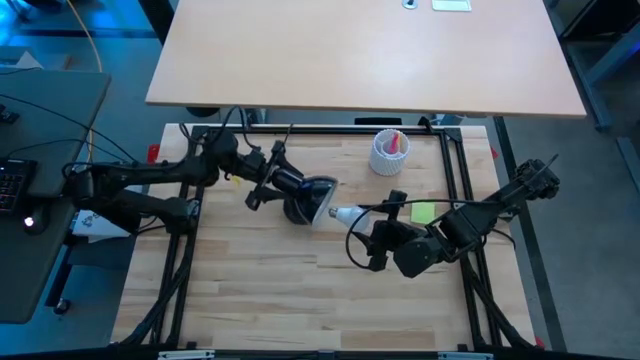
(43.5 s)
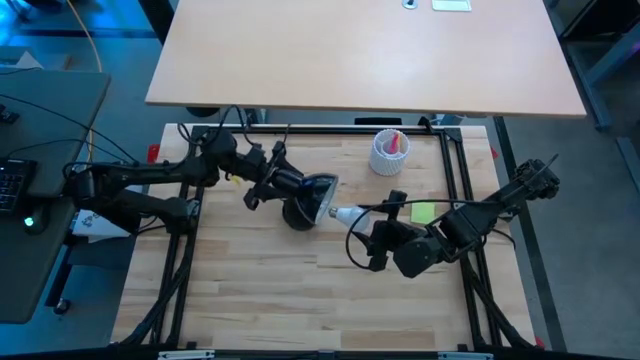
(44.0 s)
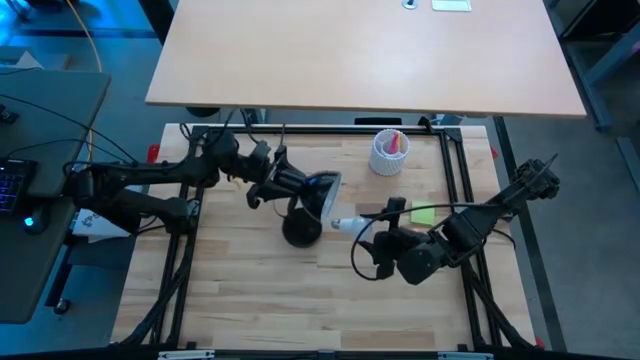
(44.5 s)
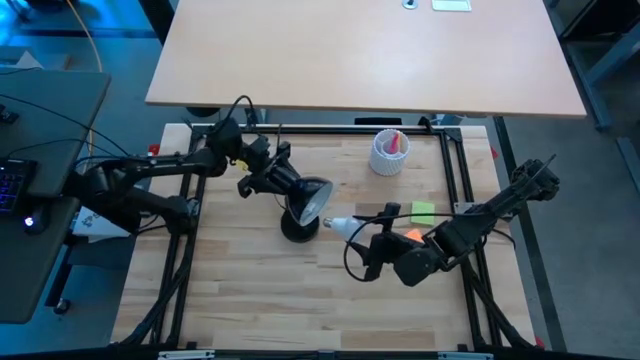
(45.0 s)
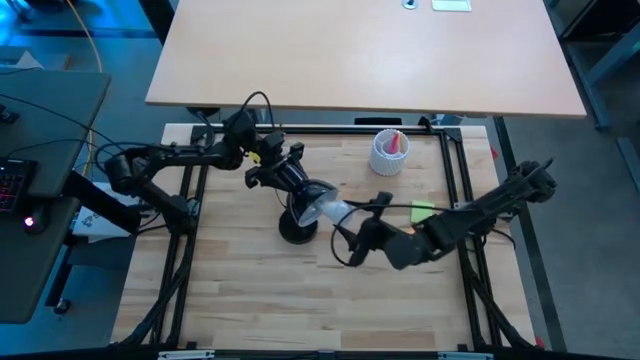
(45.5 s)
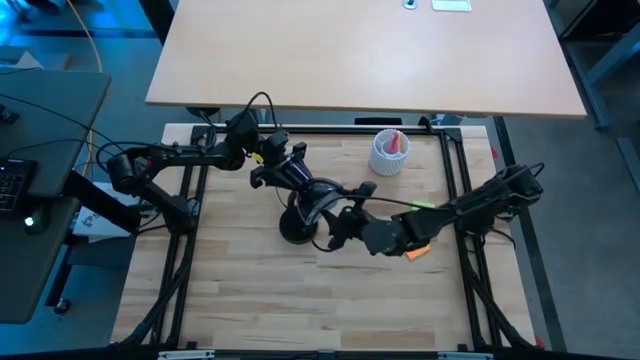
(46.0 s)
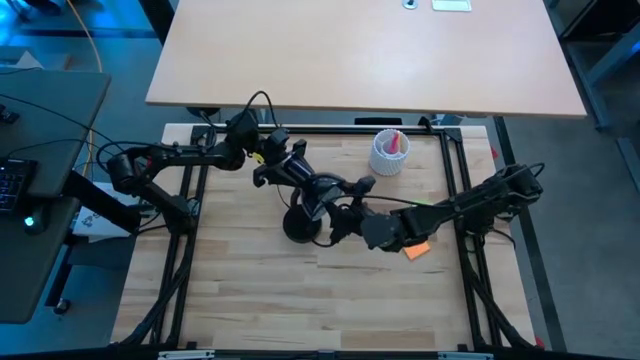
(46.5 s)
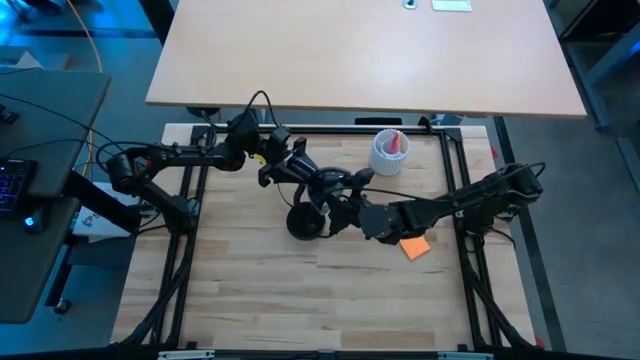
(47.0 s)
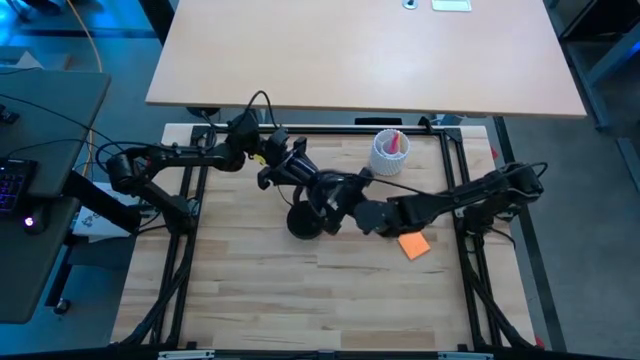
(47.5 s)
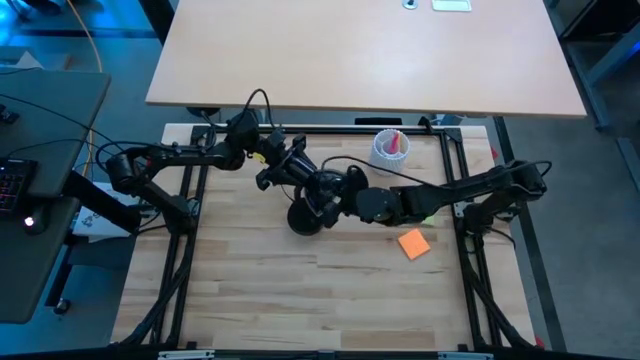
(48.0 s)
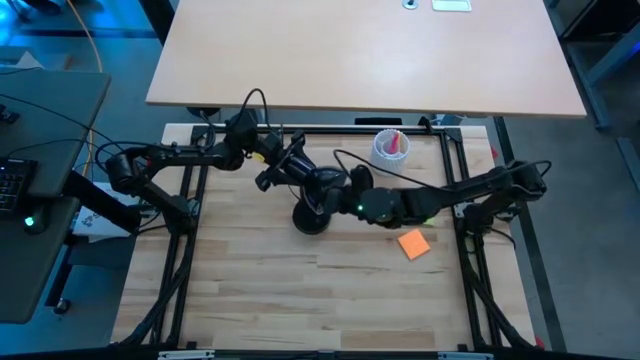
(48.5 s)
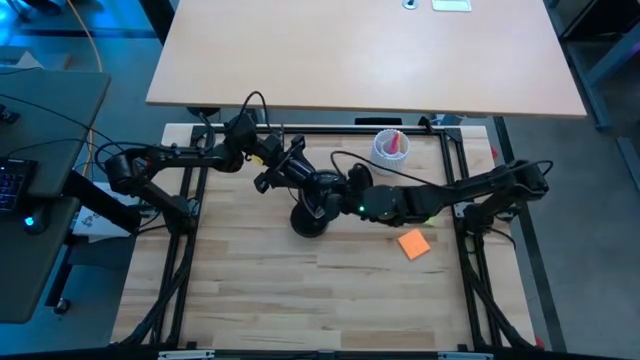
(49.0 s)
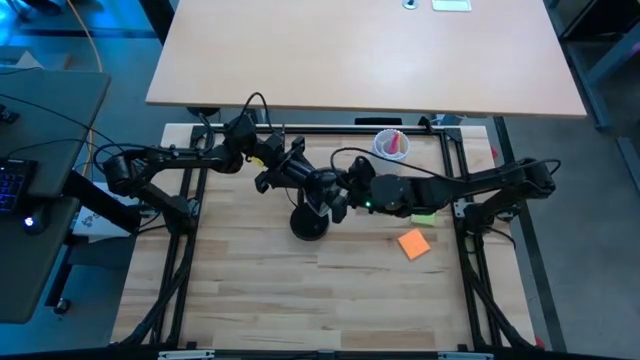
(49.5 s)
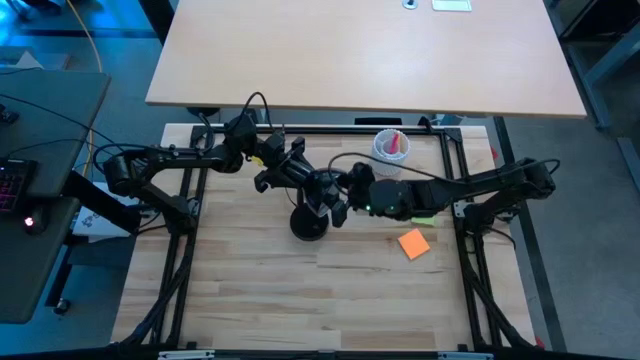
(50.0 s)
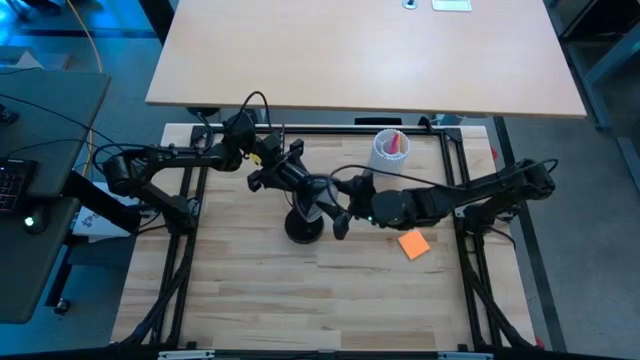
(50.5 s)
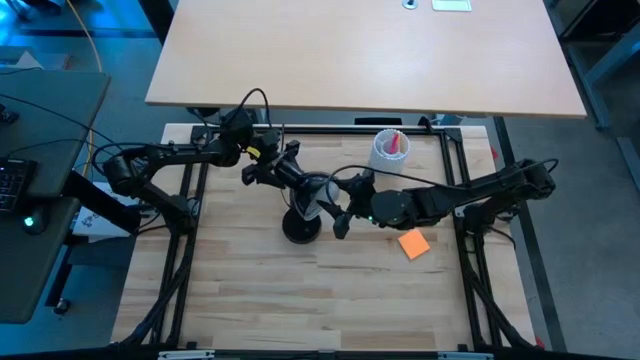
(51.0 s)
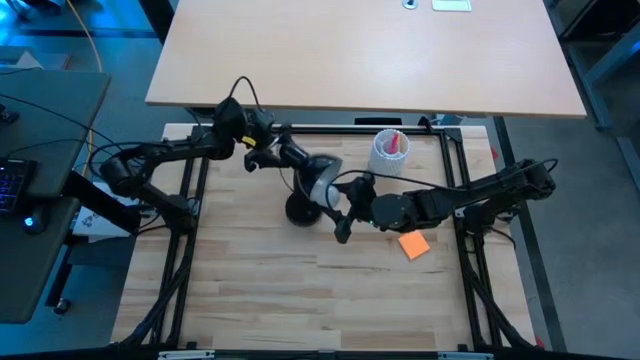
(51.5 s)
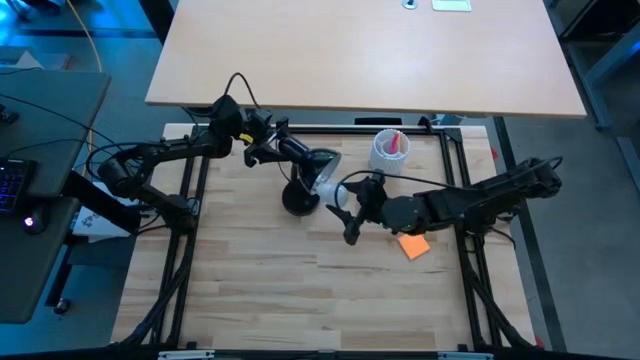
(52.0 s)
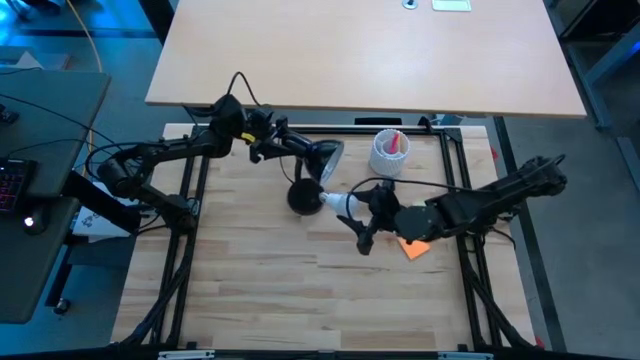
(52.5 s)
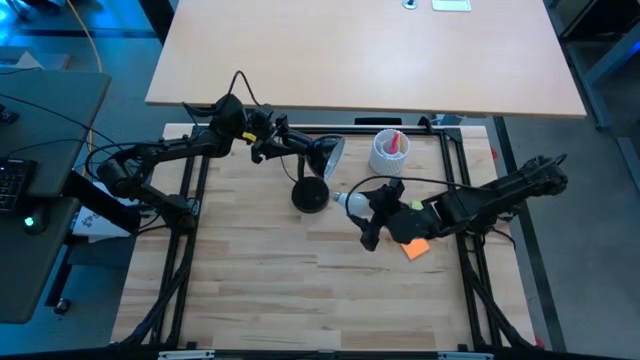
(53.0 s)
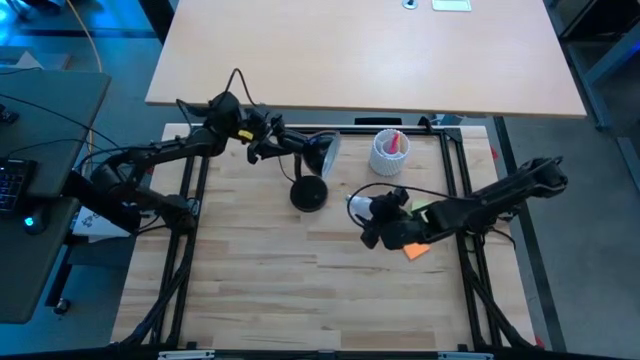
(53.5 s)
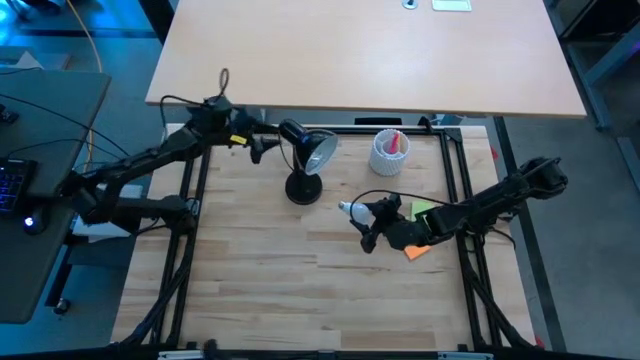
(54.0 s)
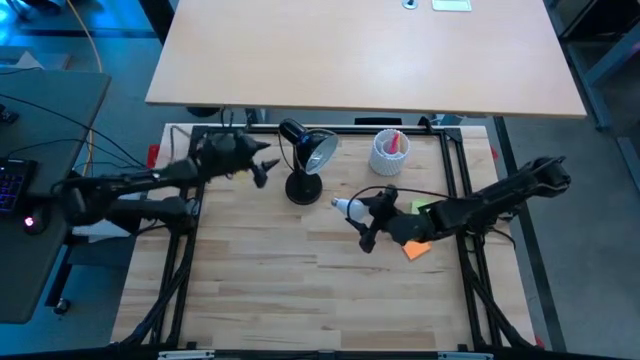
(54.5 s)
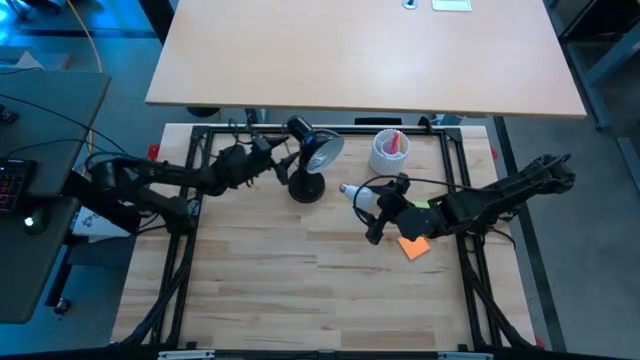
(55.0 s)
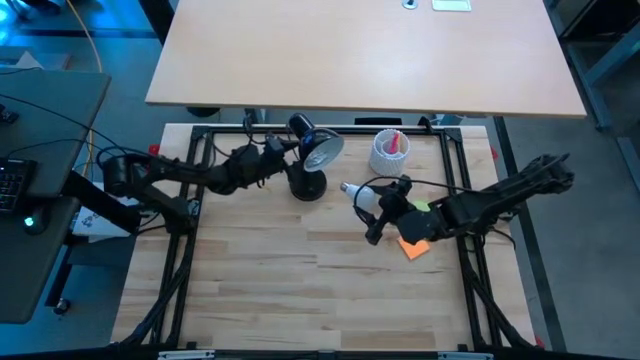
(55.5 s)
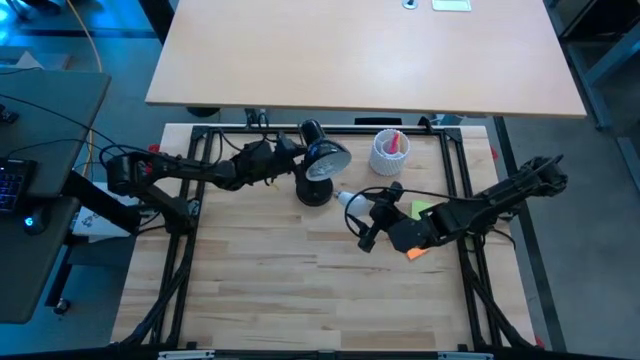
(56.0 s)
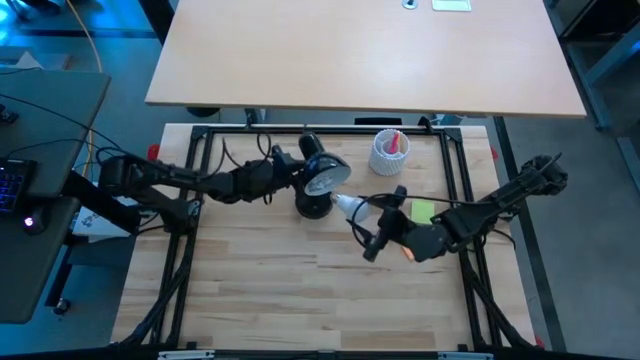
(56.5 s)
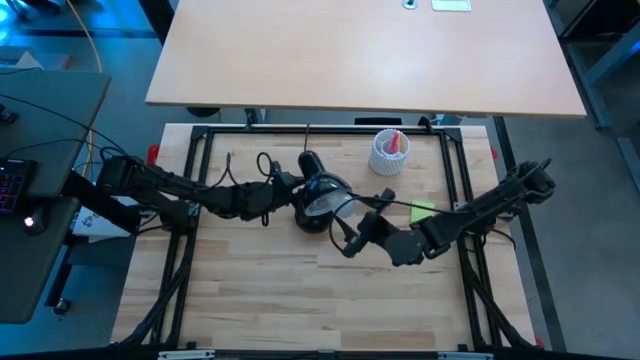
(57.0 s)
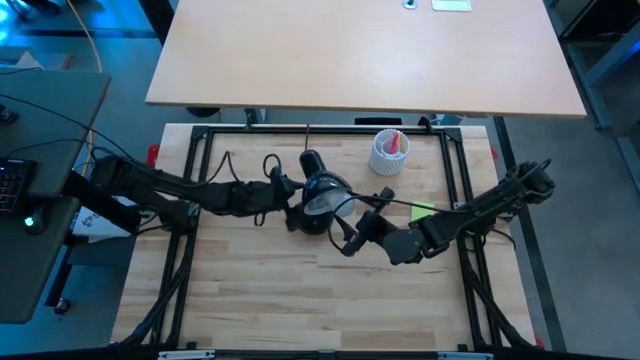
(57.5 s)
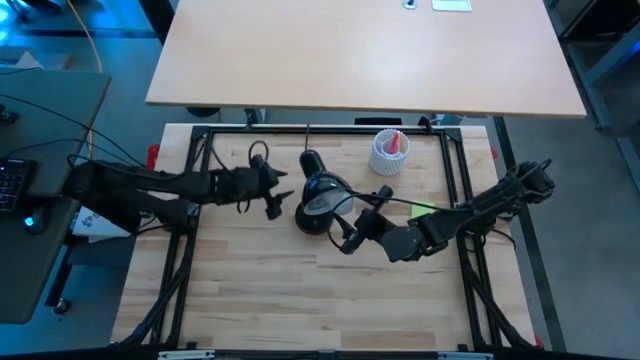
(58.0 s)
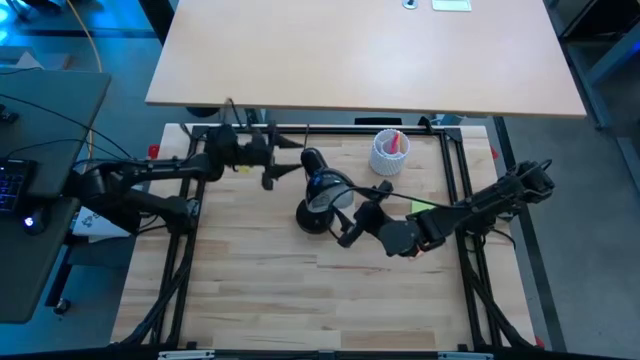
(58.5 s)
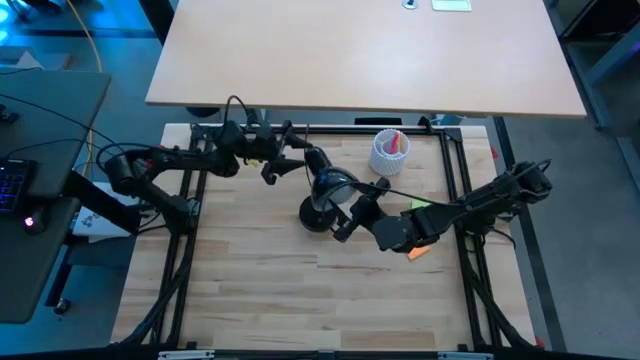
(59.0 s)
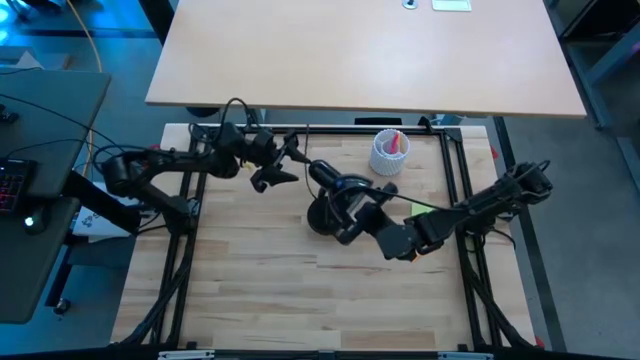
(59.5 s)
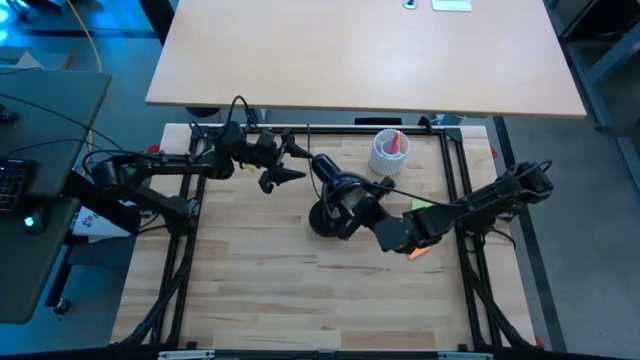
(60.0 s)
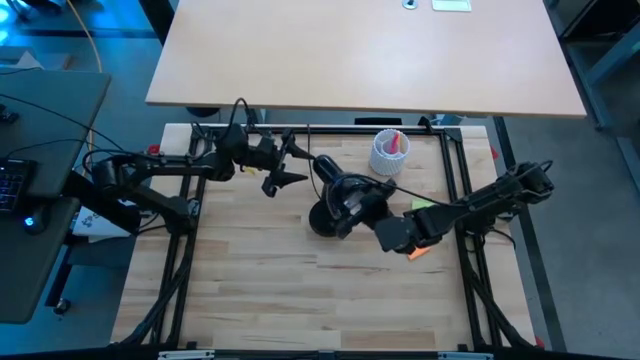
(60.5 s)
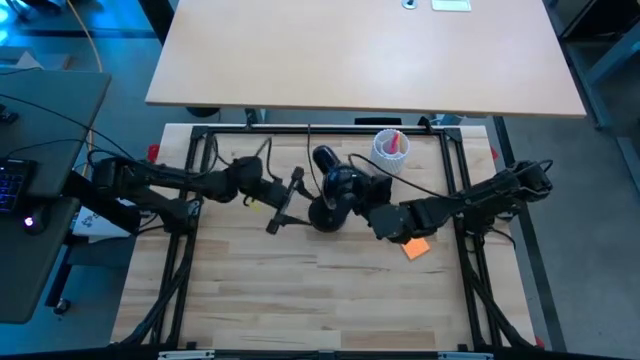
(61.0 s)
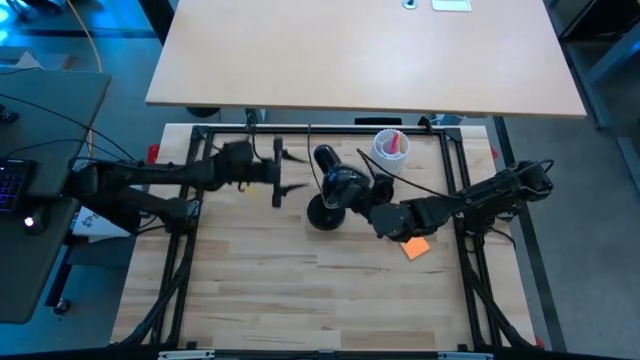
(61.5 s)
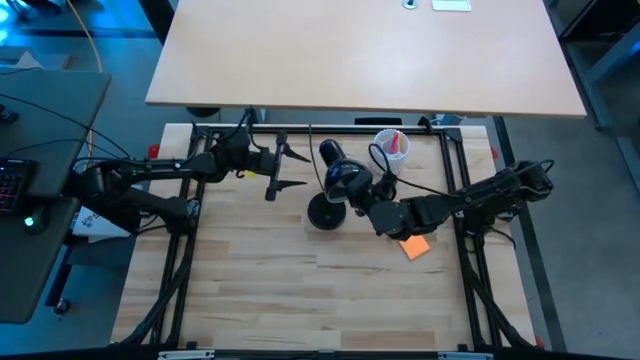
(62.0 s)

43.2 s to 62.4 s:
Task: Screw lightbulb
Insert the lightbulb into the desk lamp

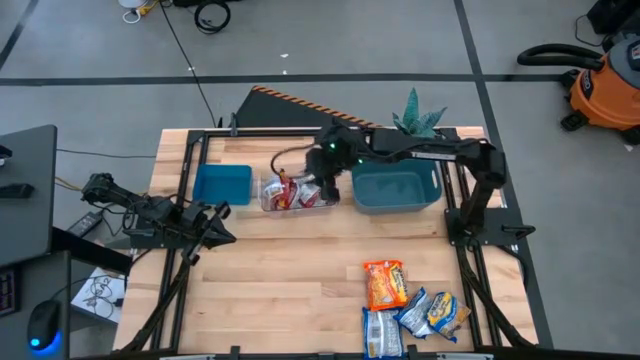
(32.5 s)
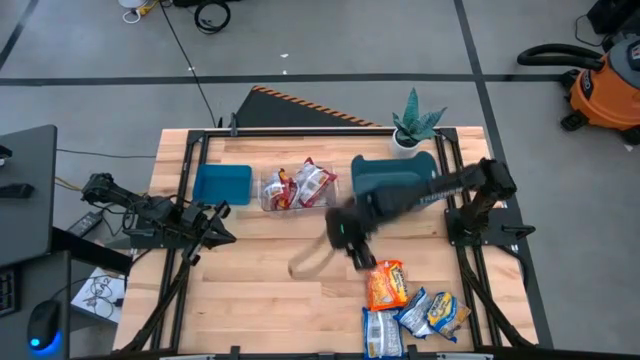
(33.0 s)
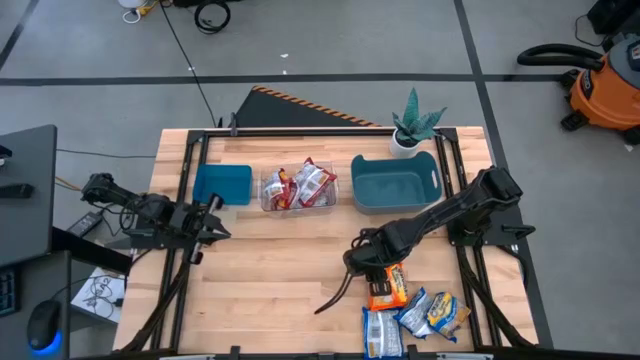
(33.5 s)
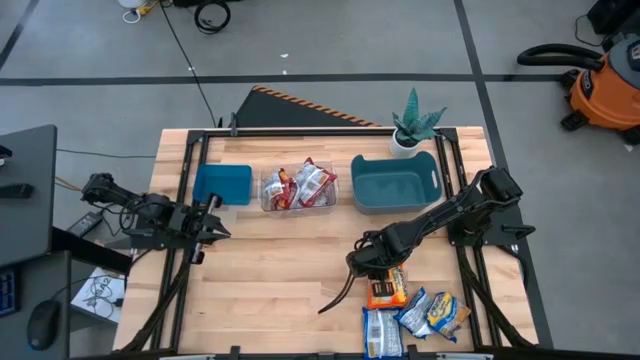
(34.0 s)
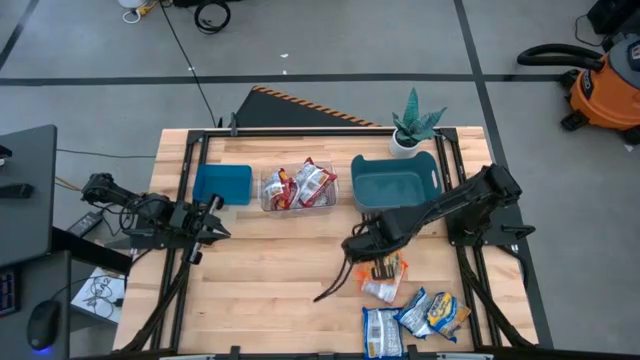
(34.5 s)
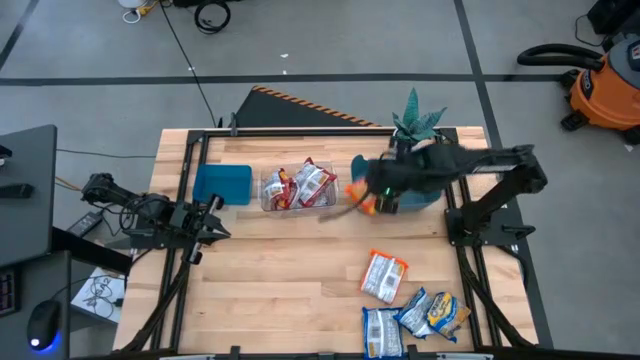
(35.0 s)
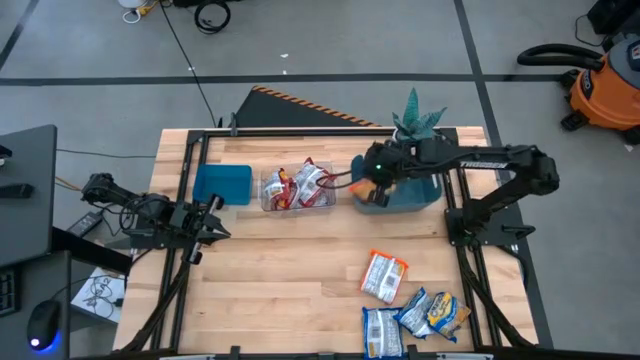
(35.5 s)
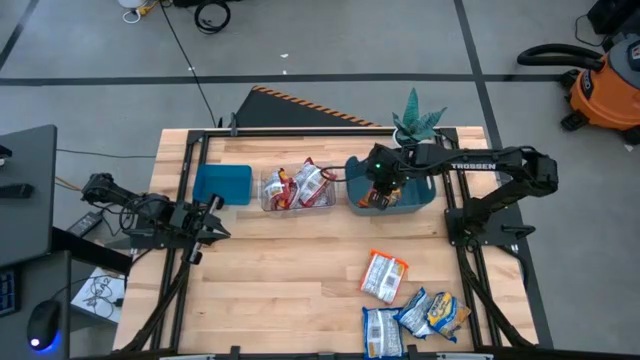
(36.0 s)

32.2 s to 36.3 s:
Task: Sort Maruchan noodles
Put the orange noodle pack into the green bin
